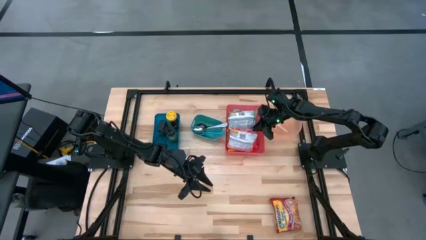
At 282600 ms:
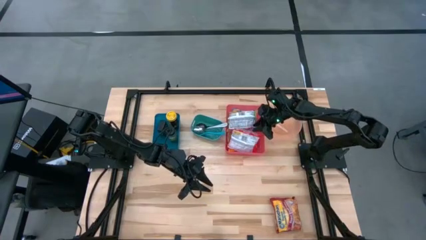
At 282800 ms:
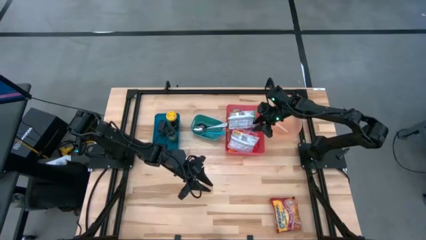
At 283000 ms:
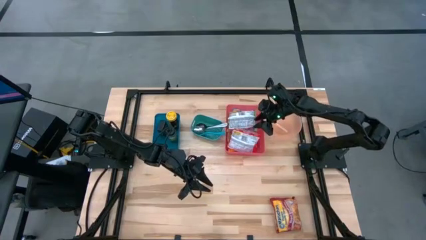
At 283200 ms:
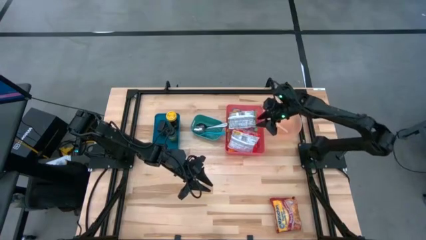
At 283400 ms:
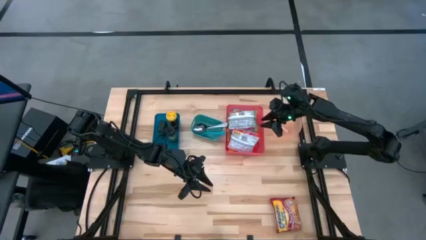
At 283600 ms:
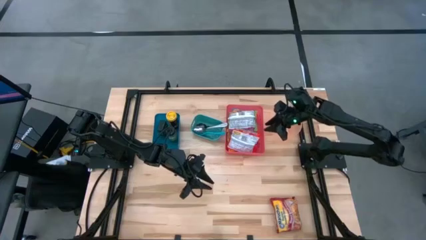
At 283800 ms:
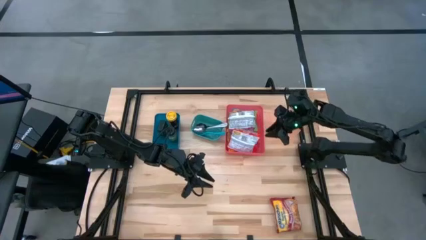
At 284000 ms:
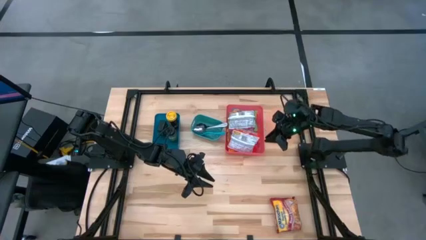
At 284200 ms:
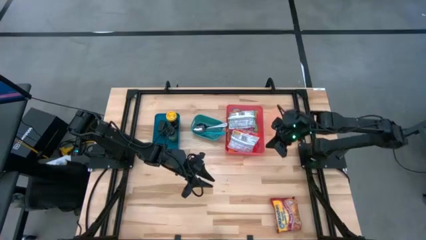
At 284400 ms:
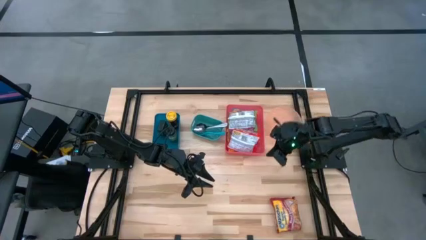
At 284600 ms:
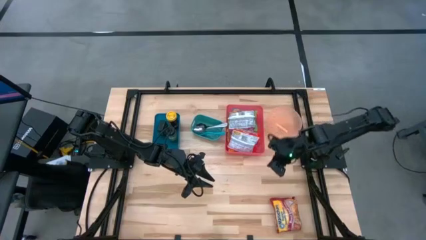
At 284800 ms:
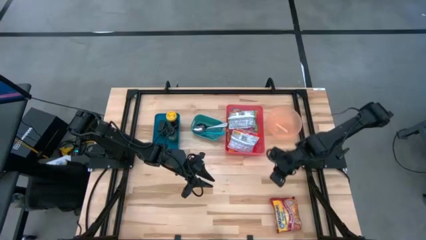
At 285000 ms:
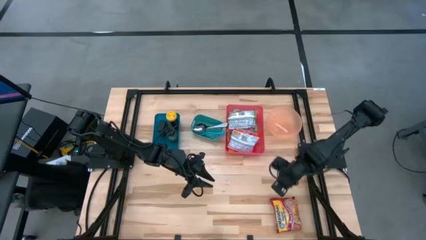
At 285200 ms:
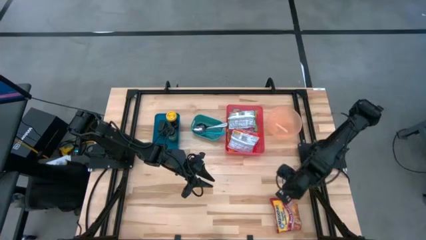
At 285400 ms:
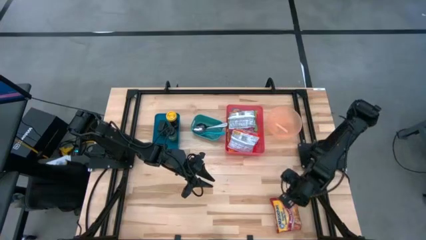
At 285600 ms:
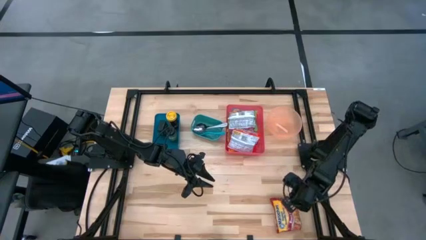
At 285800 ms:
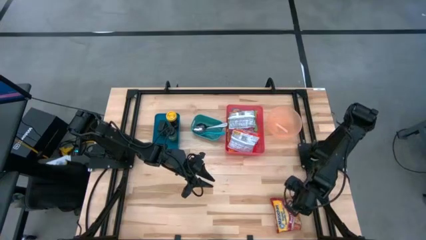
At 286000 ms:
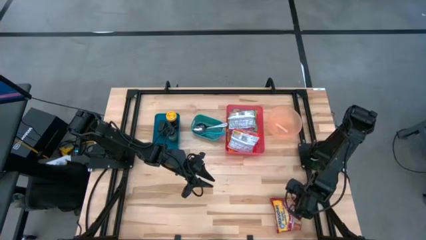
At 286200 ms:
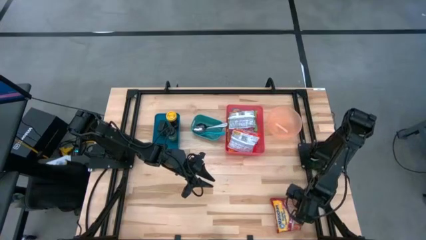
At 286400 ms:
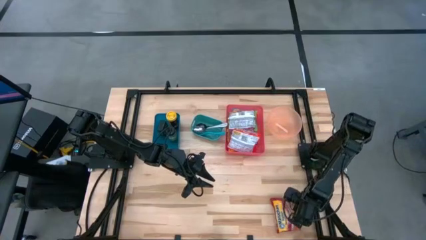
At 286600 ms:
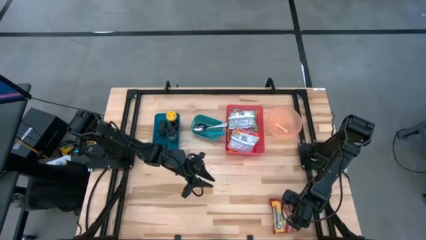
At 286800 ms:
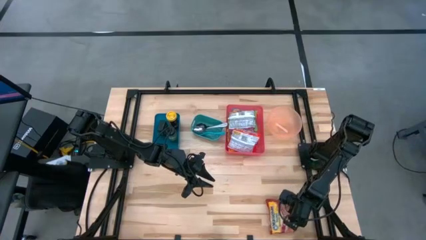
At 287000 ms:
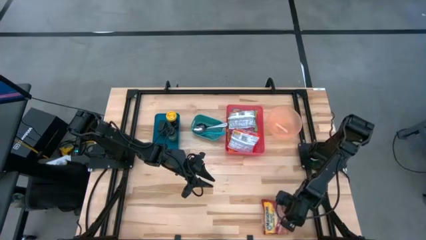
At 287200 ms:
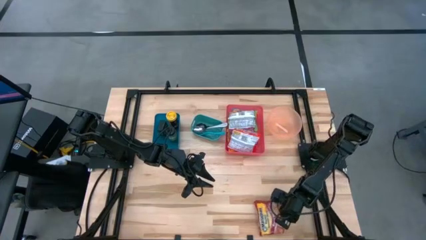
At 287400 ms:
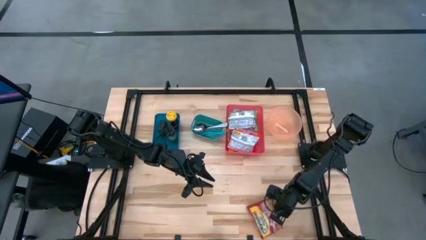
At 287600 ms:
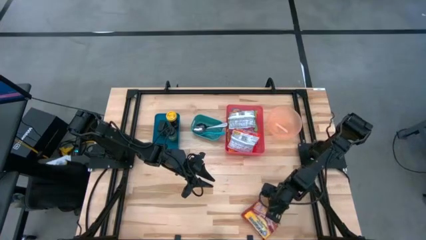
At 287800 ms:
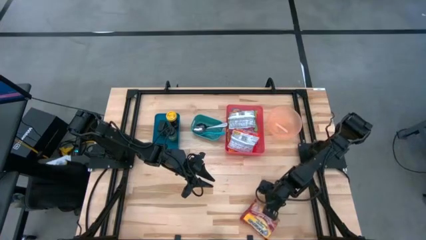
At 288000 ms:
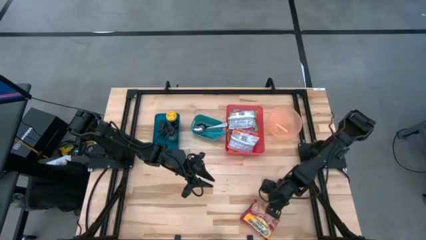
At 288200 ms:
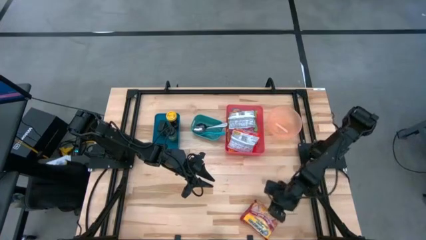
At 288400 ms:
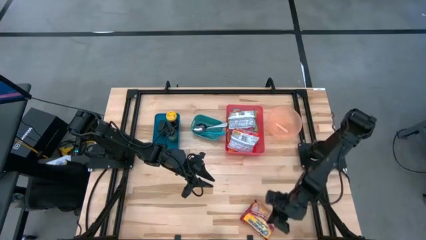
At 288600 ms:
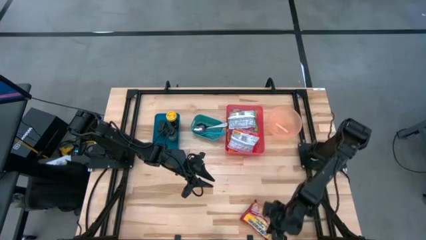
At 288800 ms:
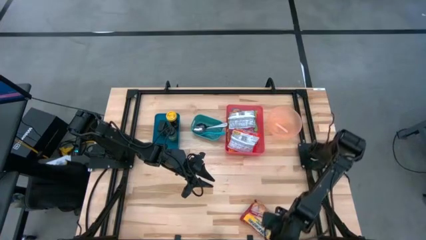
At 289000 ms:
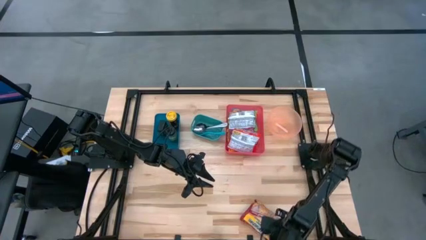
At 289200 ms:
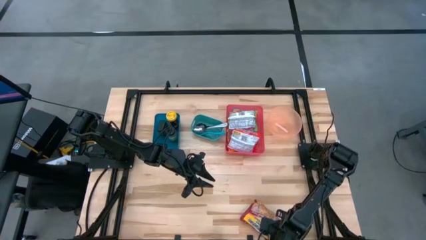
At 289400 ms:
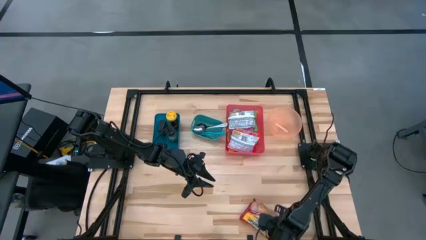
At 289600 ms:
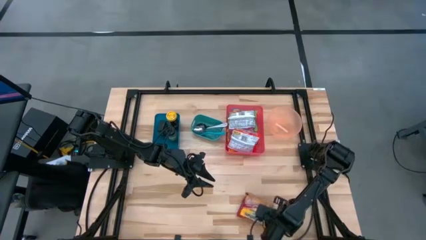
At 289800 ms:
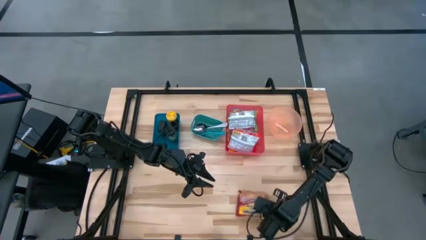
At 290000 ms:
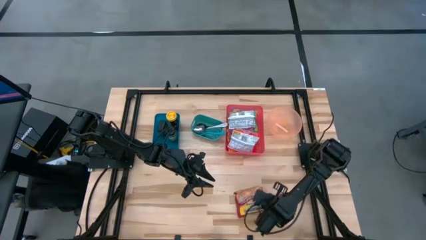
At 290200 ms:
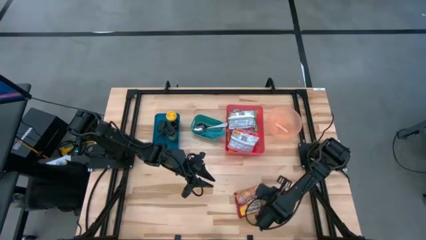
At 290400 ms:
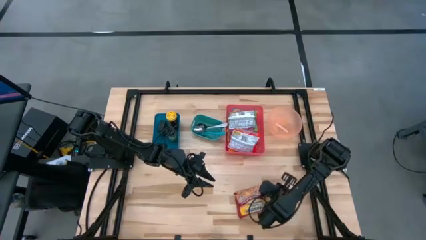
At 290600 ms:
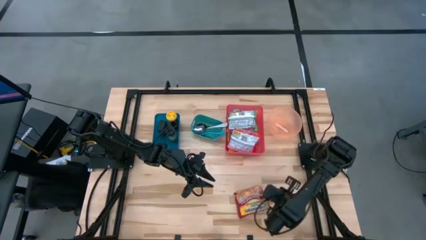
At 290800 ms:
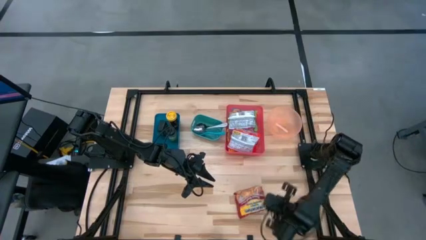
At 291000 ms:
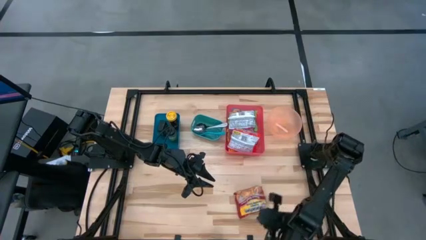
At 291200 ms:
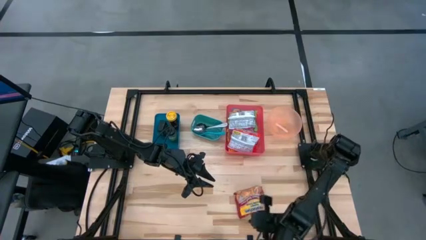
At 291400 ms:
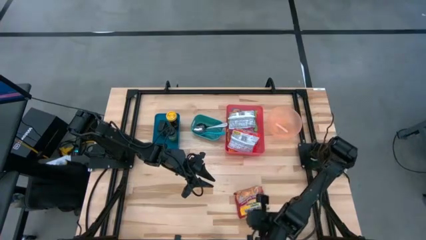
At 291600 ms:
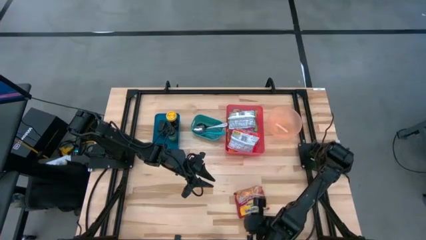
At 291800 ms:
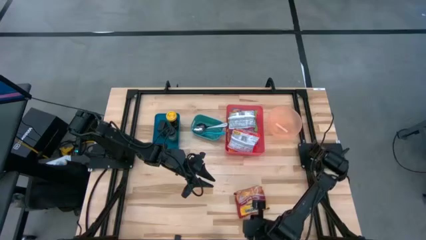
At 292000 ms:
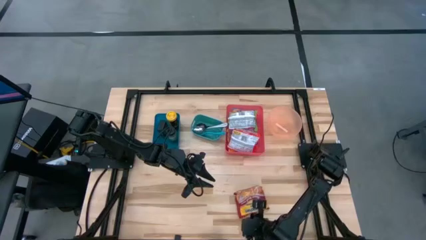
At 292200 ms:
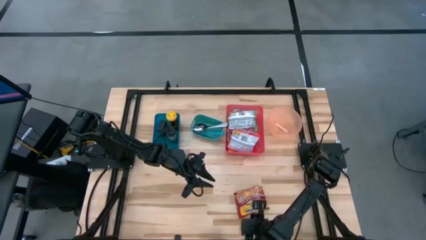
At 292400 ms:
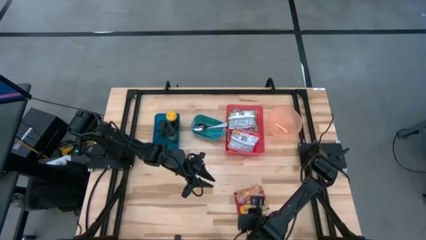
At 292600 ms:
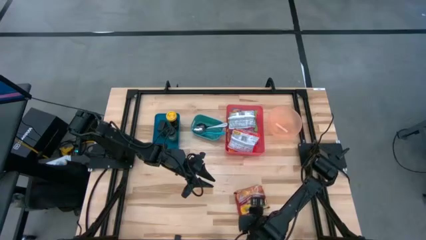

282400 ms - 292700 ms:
Task: Pick & Place Food Item
Put the red noodle pack into the red bin

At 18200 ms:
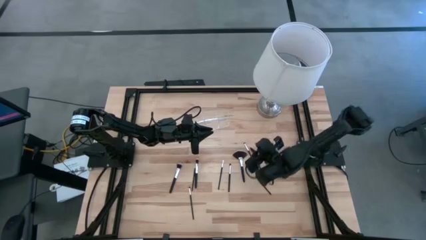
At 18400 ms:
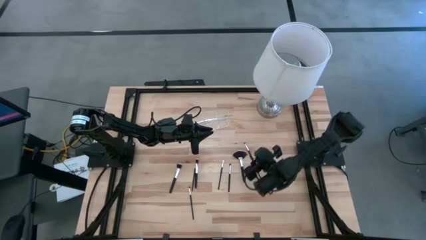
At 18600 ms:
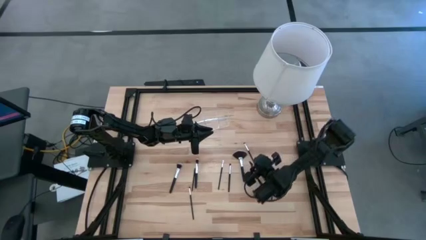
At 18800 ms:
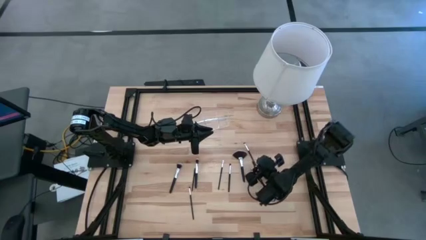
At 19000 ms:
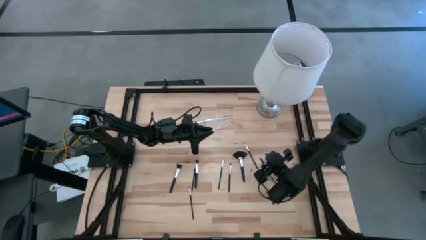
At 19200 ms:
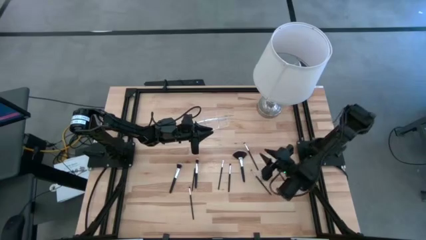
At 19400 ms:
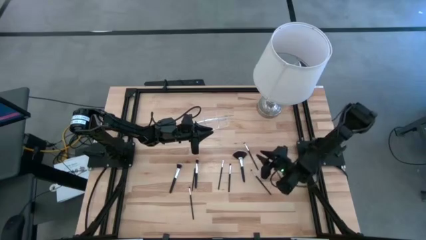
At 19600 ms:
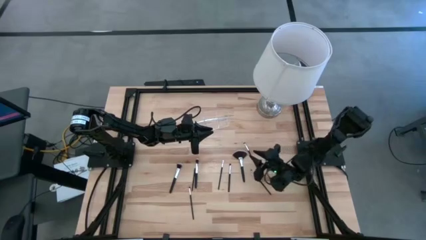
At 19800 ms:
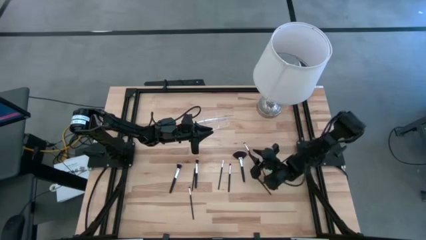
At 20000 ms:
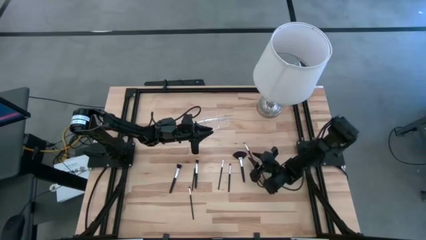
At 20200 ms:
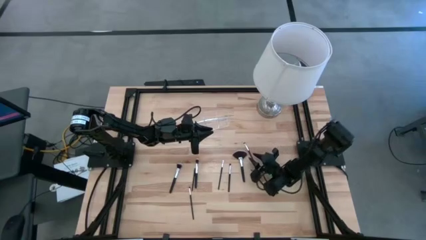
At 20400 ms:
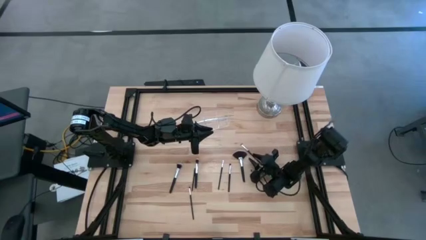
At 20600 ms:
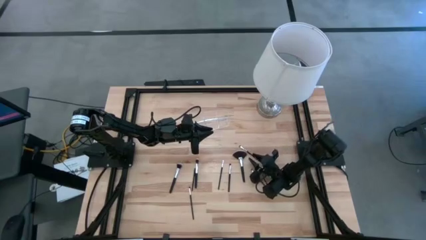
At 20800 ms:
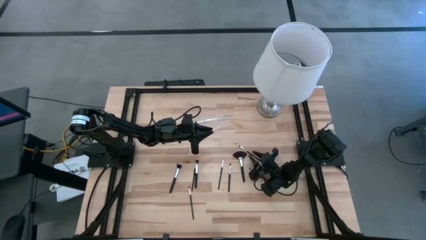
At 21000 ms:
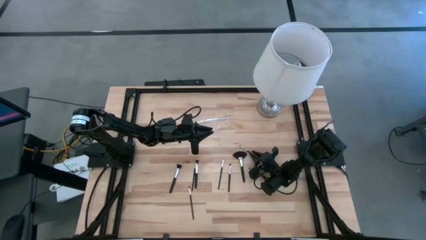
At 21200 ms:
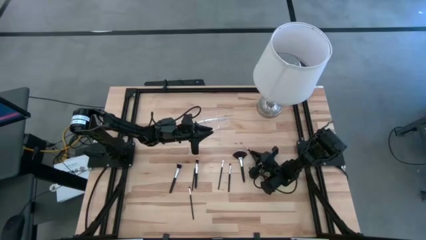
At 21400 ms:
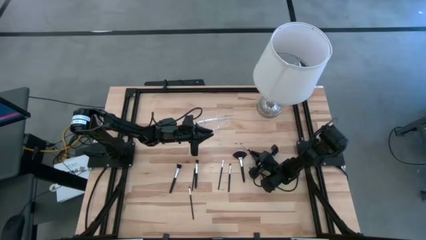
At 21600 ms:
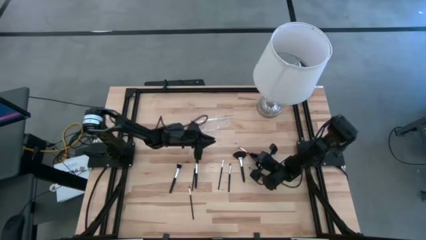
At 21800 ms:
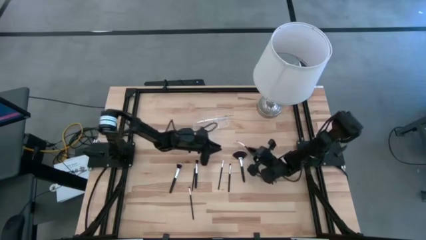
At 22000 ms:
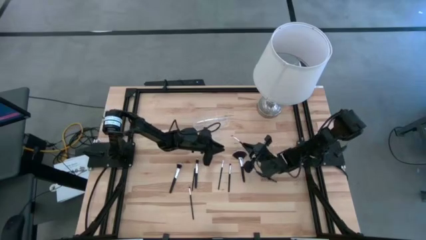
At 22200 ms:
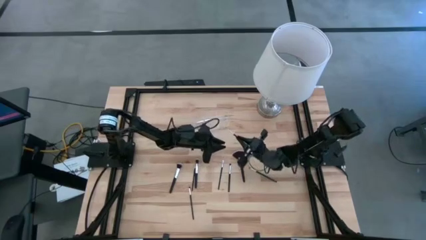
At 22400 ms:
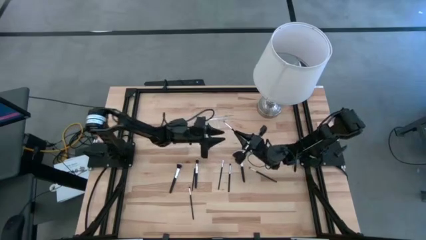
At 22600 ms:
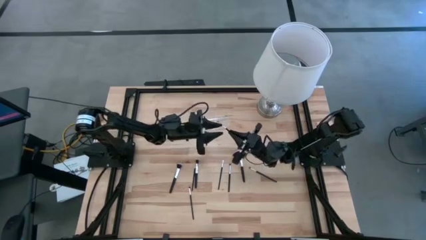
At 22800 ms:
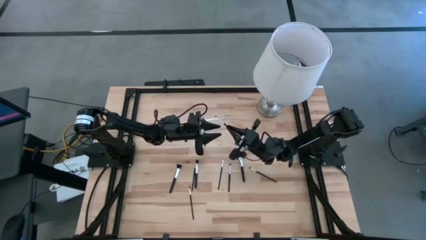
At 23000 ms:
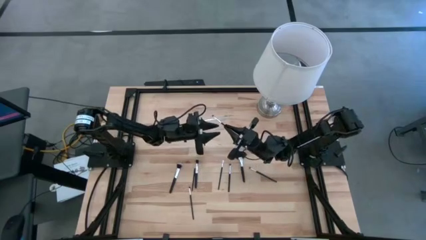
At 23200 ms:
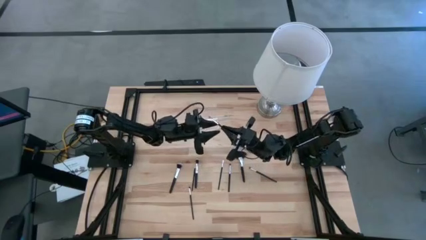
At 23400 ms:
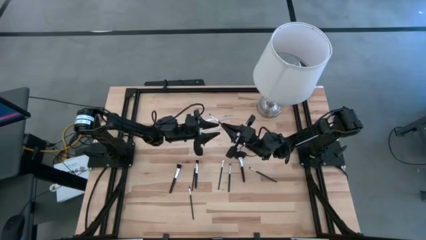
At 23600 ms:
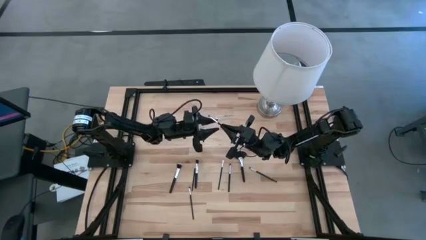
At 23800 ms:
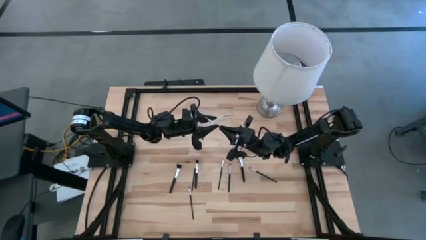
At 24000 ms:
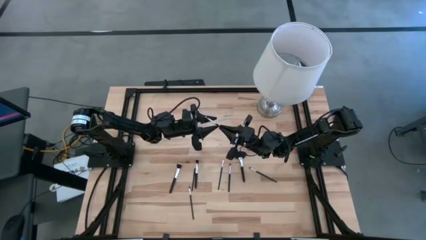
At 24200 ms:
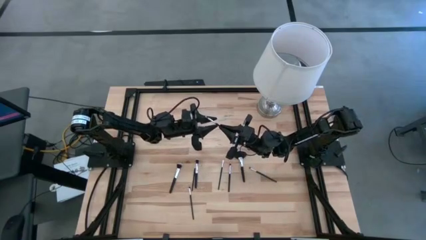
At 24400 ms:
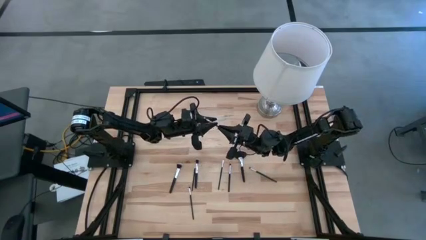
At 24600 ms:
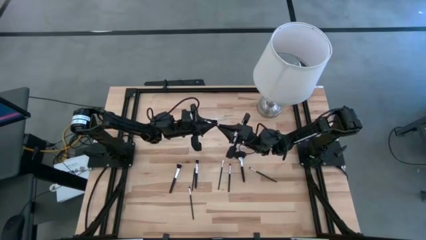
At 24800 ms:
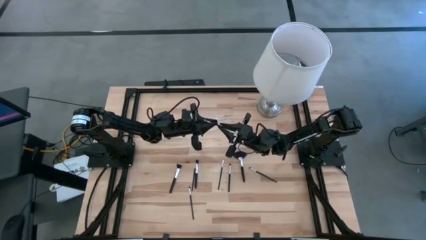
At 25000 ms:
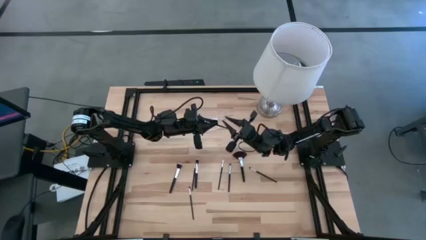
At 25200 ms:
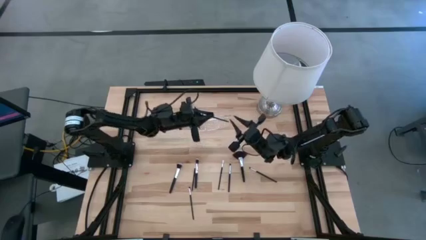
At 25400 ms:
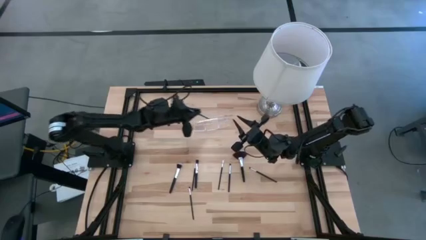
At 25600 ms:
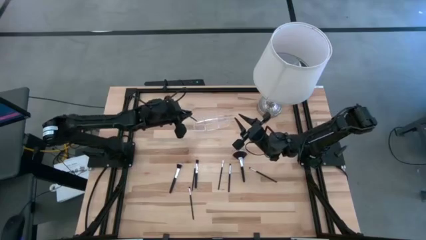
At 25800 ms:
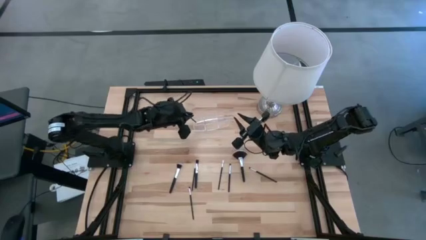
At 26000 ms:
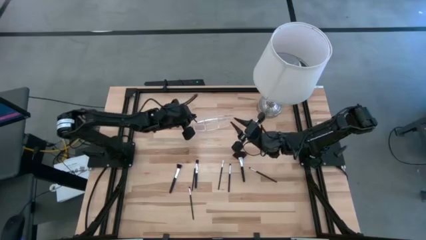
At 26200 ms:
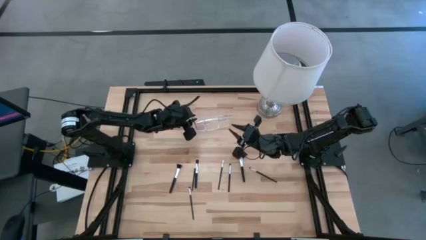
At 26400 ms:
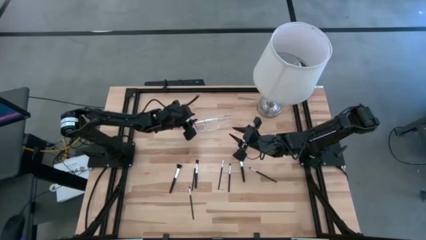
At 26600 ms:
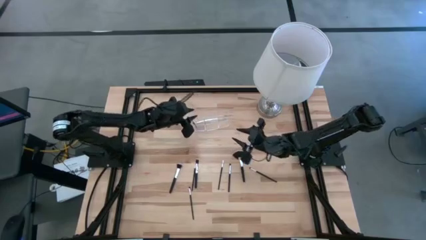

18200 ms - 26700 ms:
Task: Sort items
Put the right foundation brush into the transparent organizer
